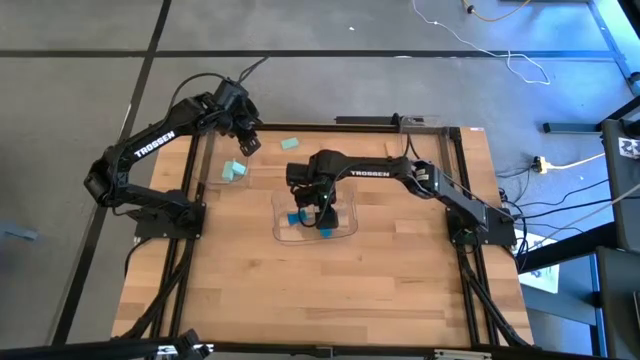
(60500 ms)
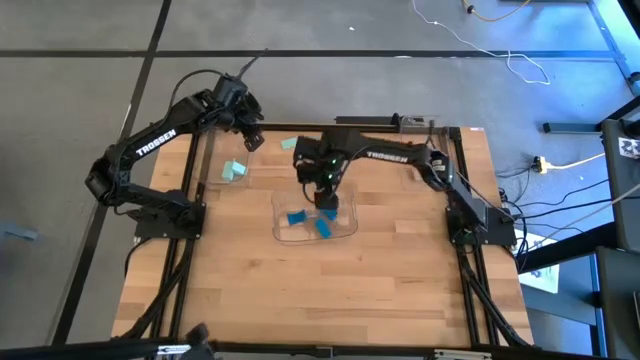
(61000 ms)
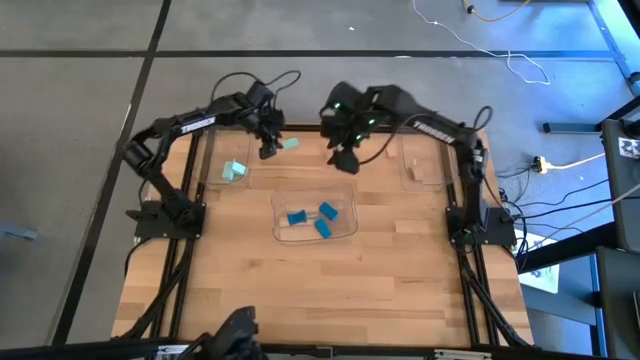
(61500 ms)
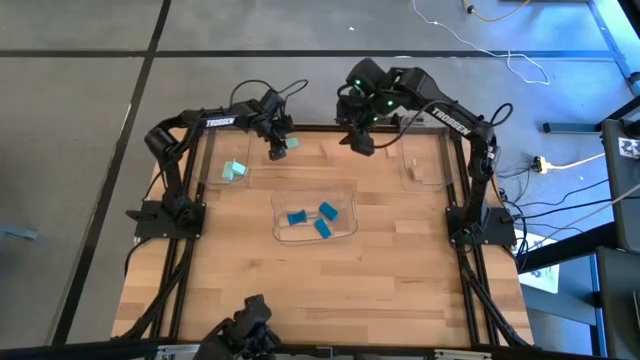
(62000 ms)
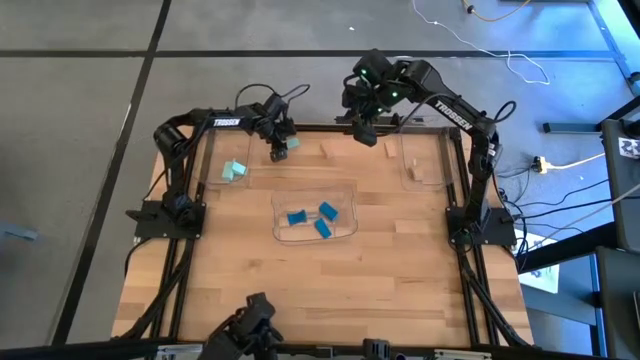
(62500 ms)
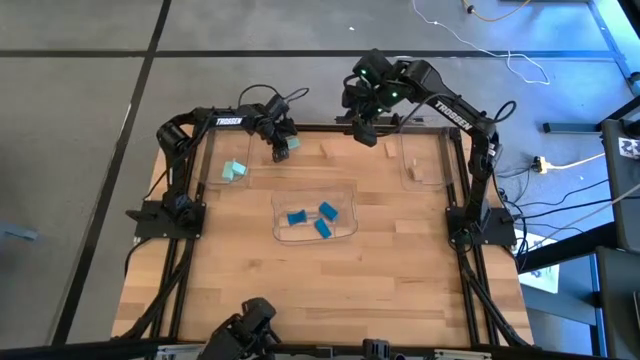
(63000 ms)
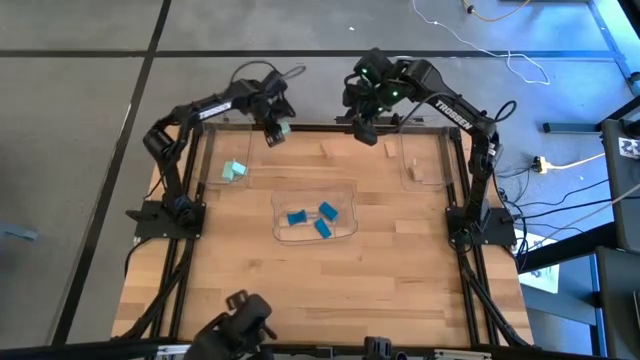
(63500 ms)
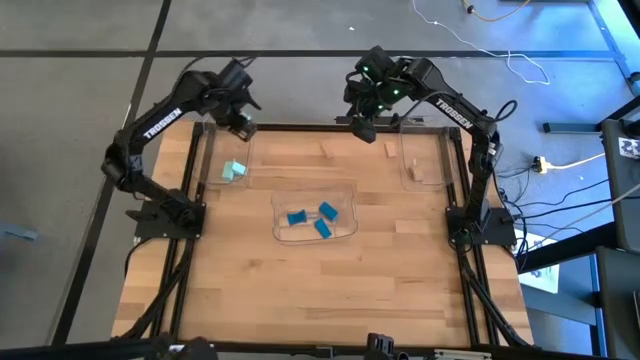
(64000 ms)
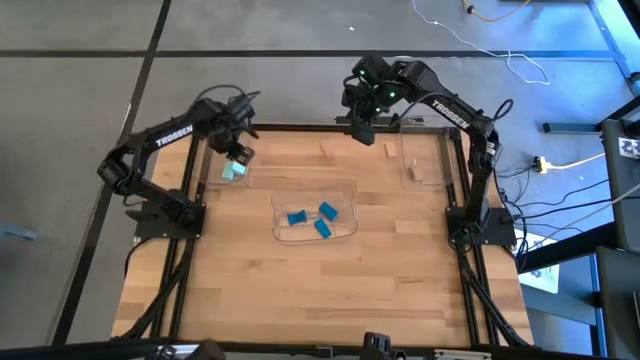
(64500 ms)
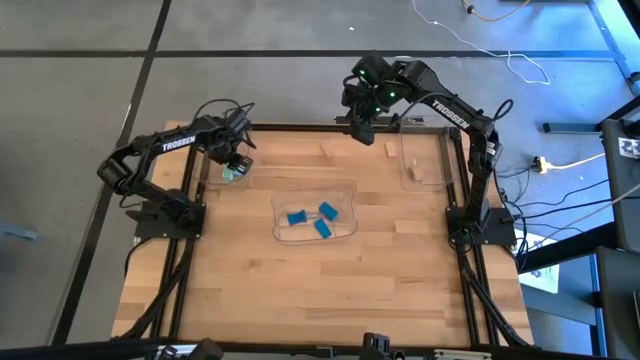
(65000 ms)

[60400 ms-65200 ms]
Task: Sort & place blocks by color
Put the light blue block into the top left transparent bin

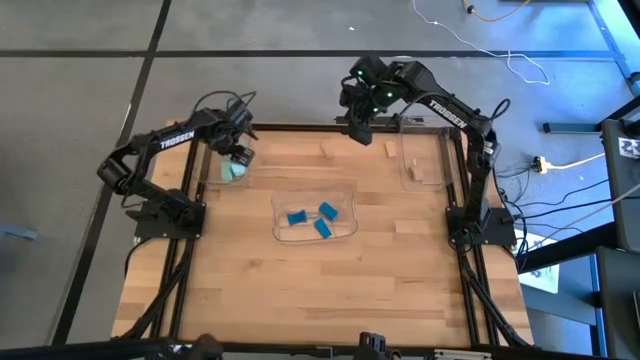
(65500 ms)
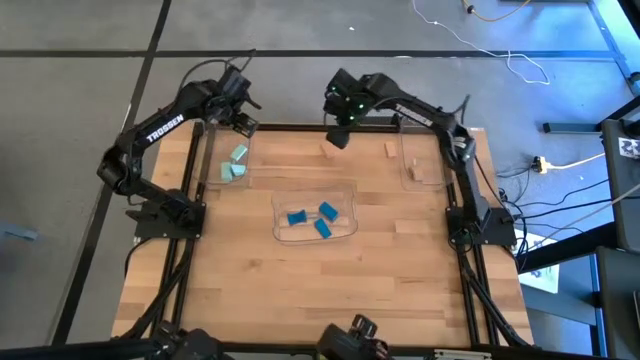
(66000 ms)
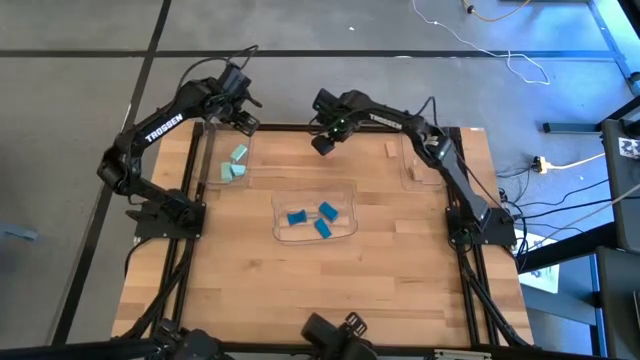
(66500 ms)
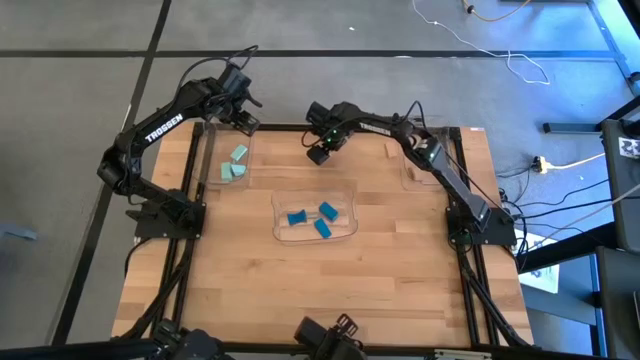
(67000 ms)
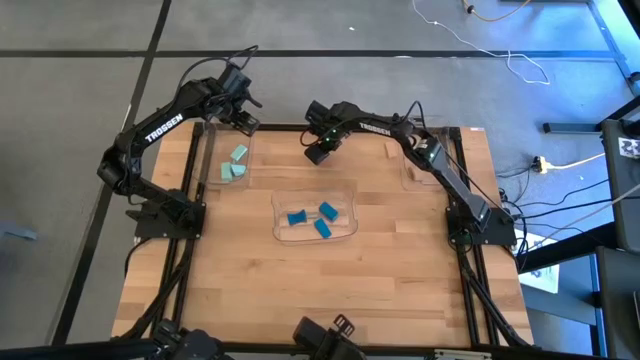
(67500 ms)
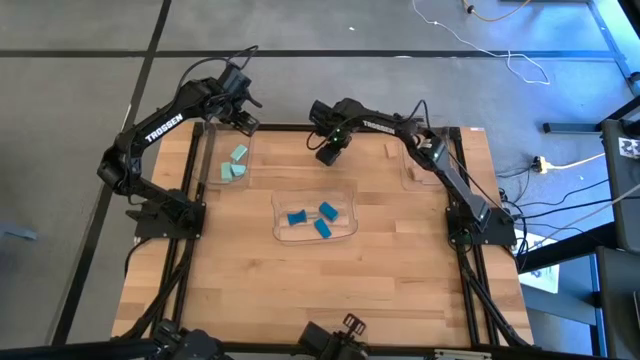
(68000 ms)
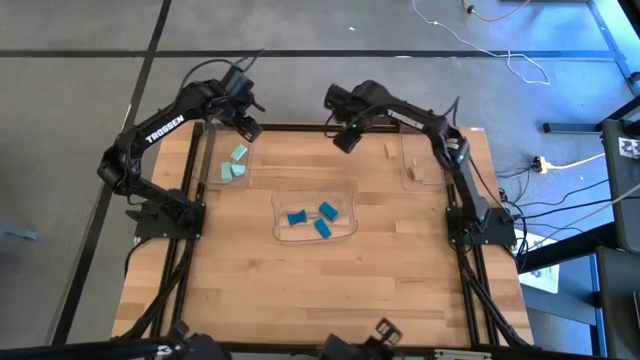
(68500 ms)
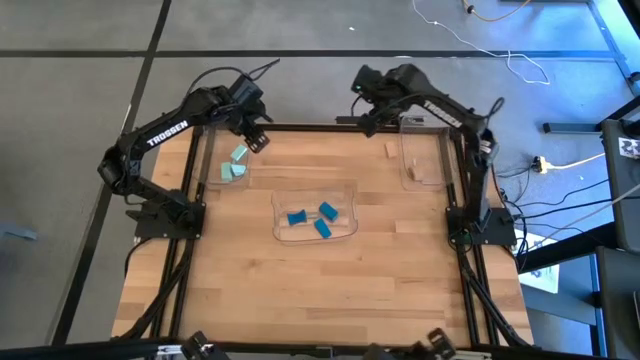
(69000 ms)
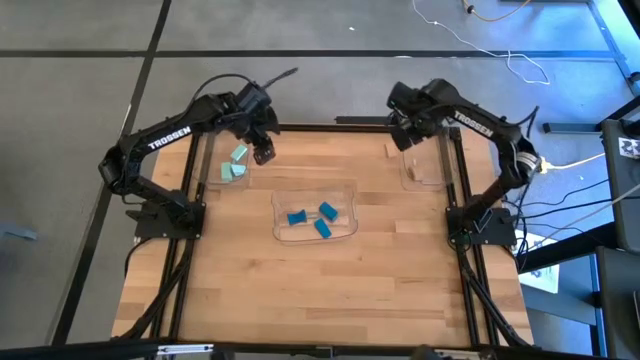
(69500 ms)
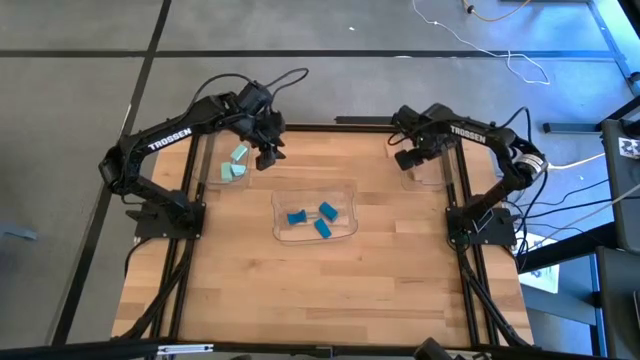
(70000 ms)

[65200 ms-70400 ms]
Put the left brown block into the top right transparent bin

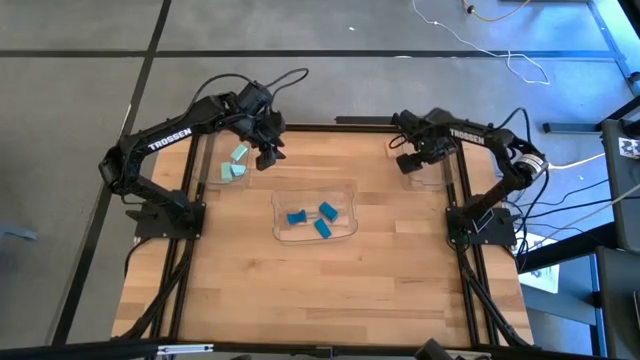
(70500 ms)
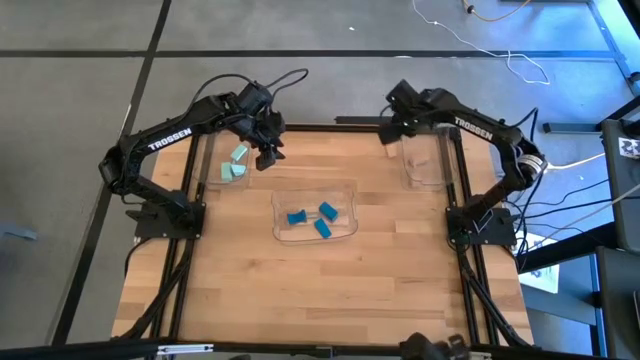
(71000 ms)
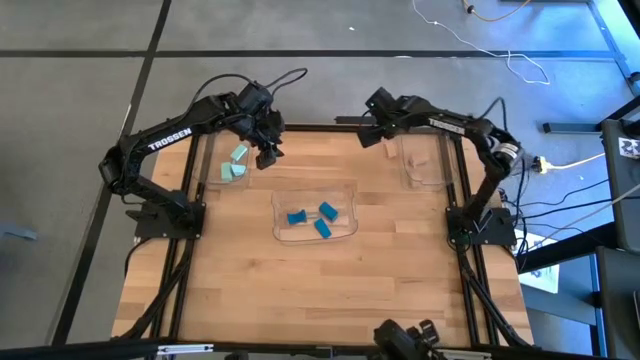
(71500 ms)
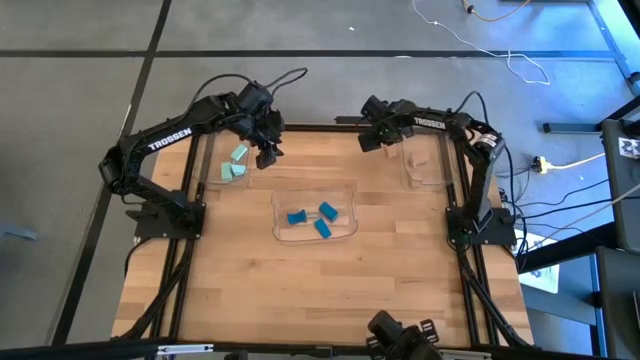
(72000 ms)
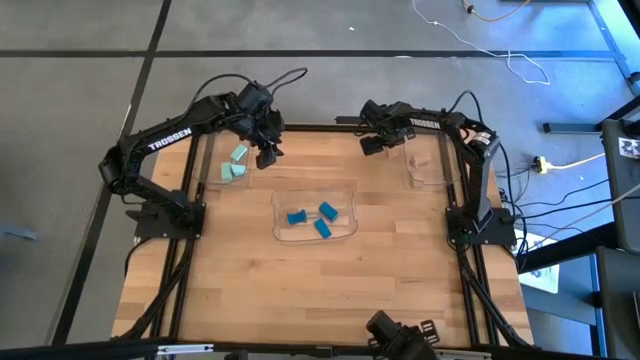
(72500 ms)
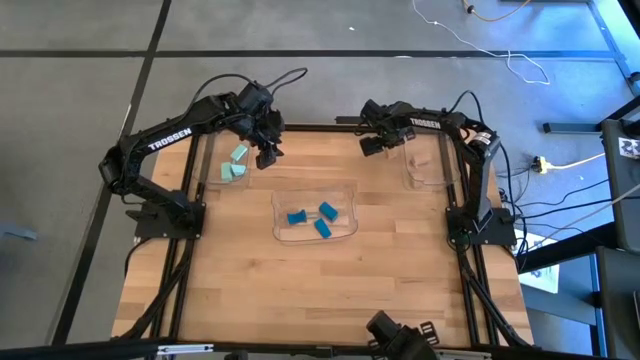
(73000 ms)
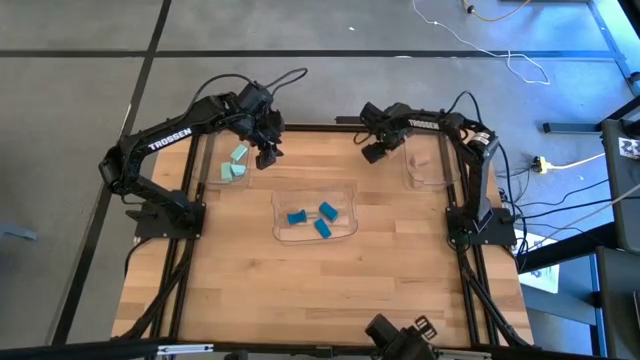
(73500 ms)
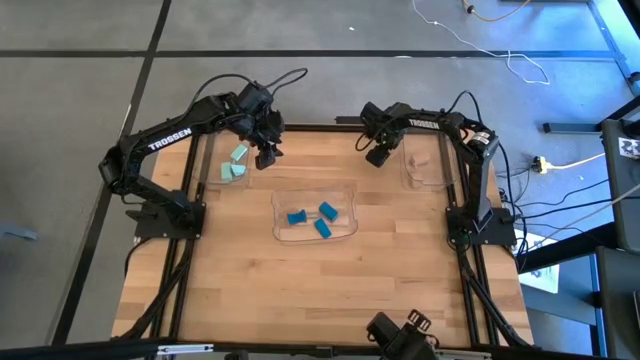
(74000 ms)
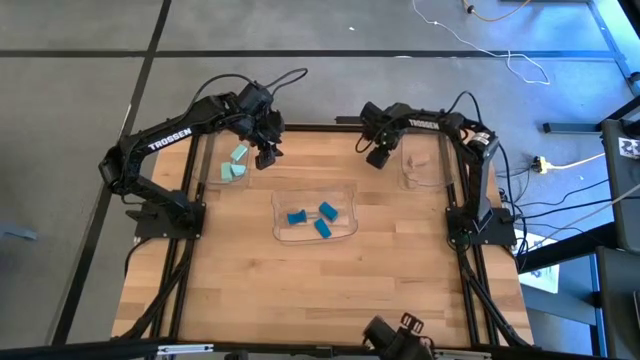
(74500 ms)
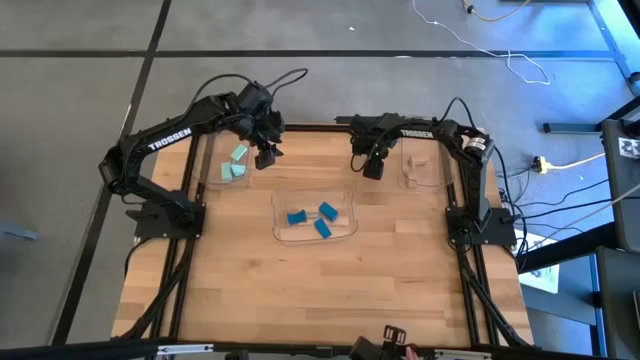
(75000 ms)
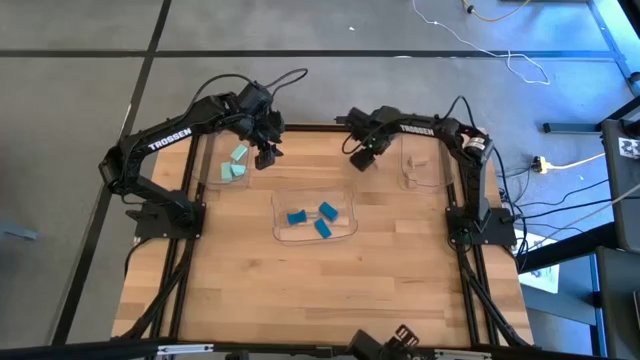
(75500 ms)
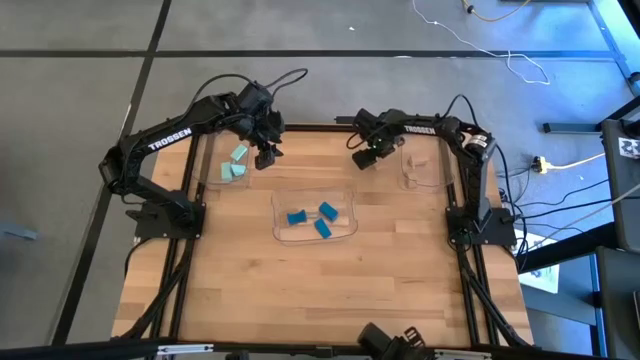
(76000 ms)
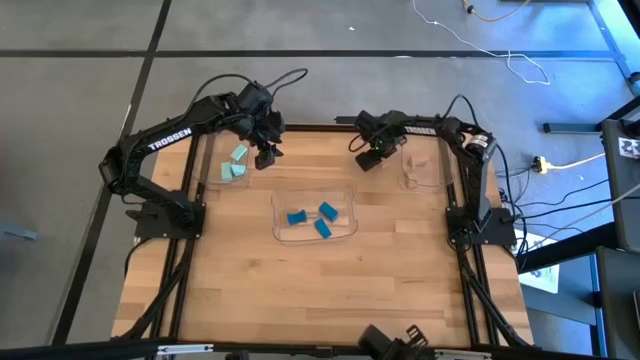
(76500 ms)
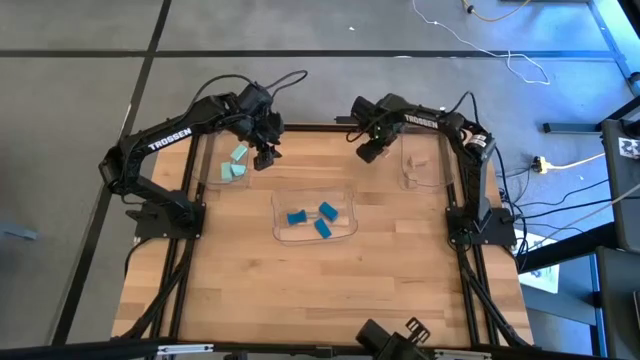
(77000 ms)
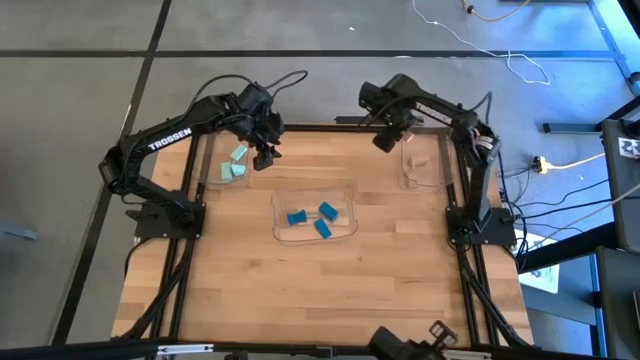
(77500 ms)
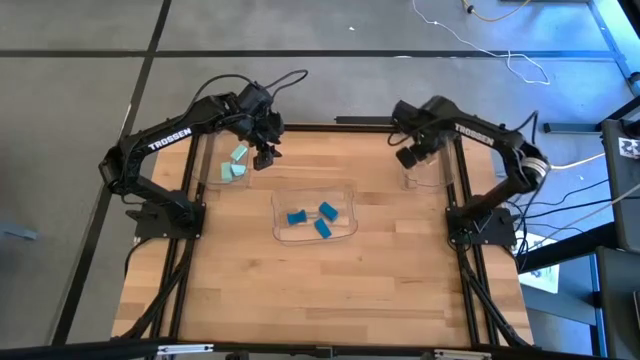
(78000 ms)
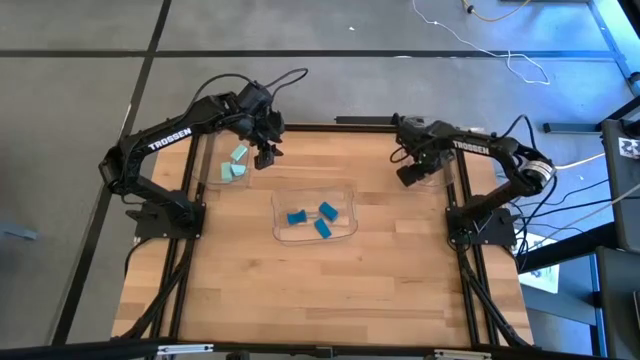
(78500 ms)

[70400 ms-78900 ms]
Put the brown block into the top right transparent bin

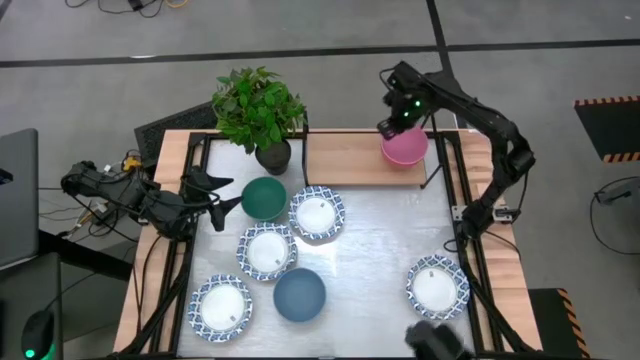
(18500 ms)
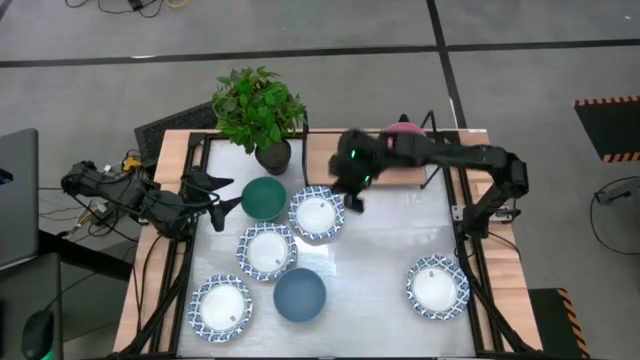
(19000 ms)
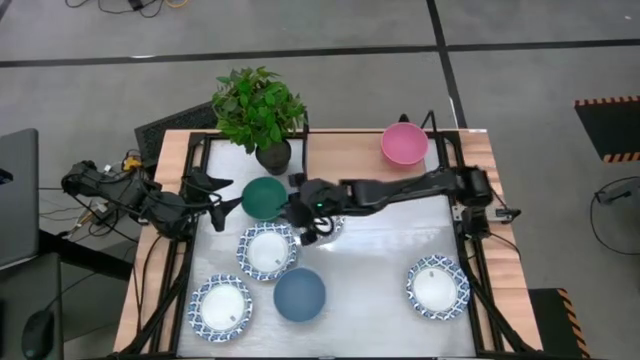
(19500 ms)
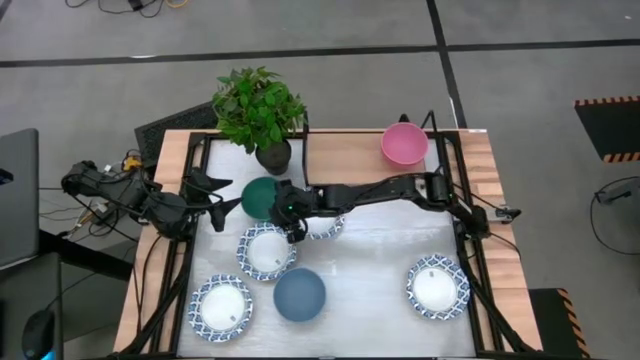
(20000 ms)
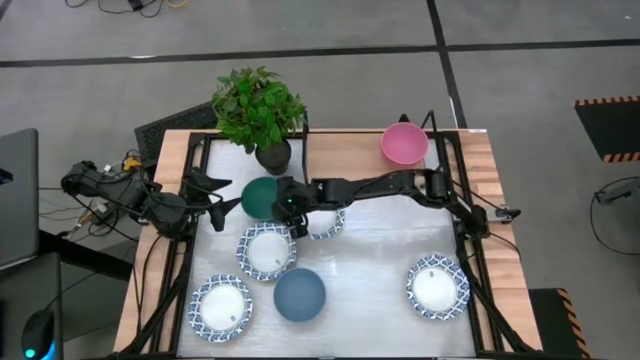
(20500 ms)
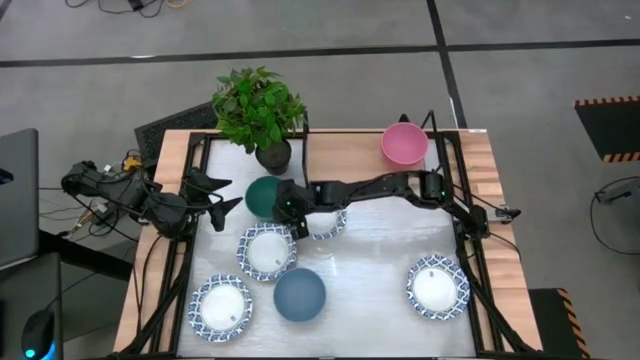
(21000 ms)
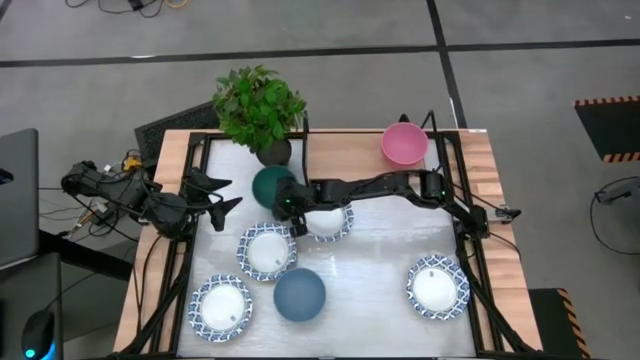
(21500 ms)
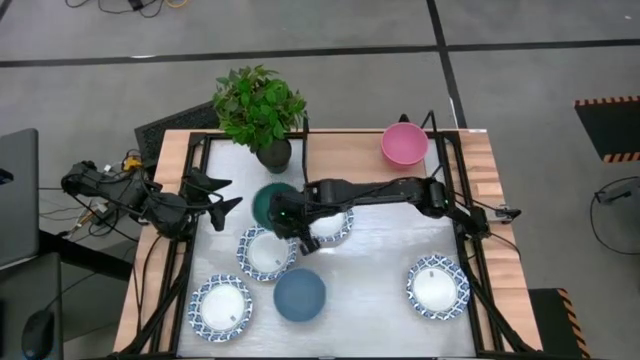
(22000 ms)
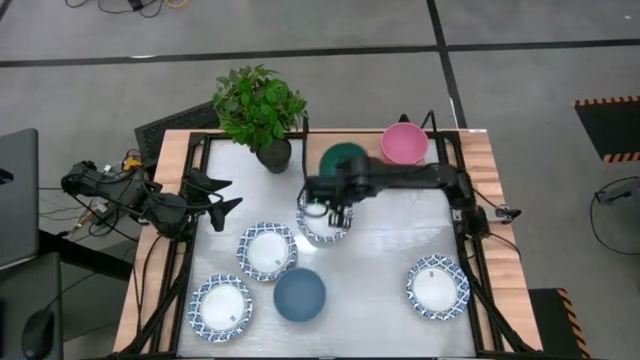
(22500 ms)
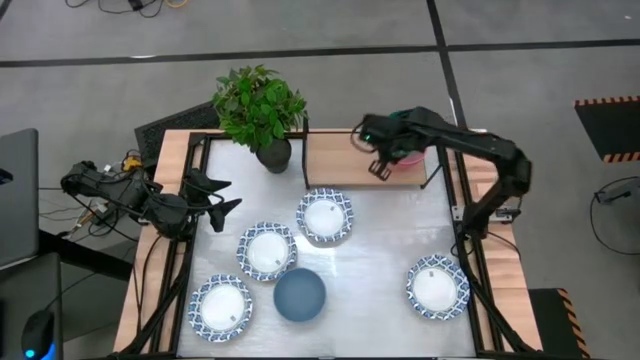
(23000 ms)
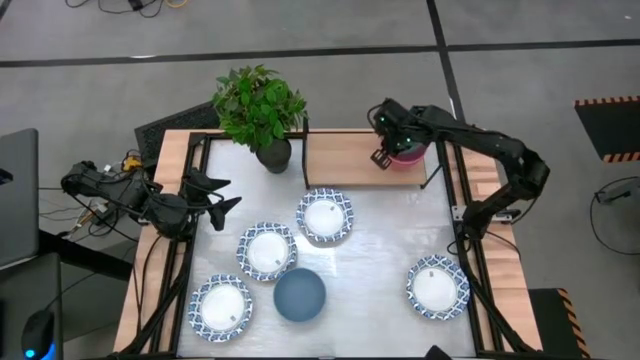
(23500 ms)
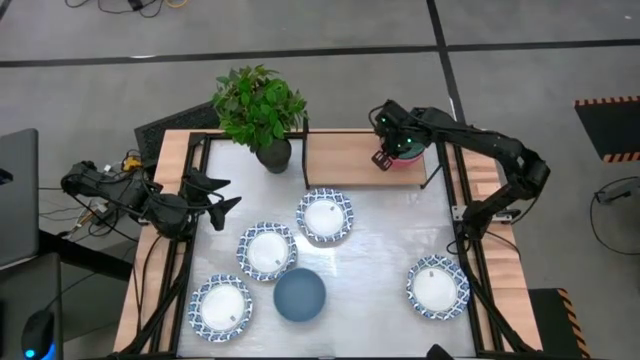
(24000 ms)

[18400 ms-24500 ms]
Task: Place and stack bowls onto a shelf
Stack the green bowl on top of the pink bowl on the shelf
